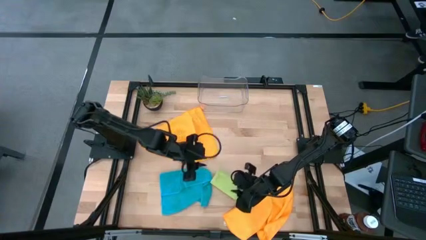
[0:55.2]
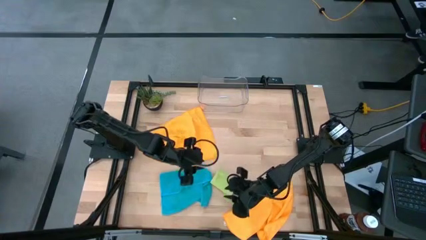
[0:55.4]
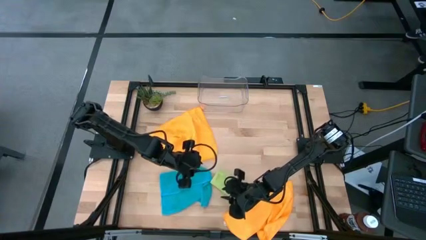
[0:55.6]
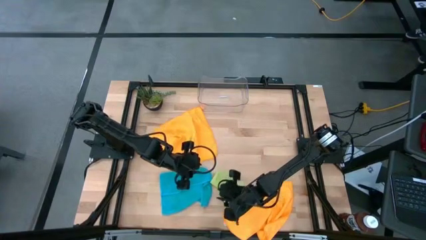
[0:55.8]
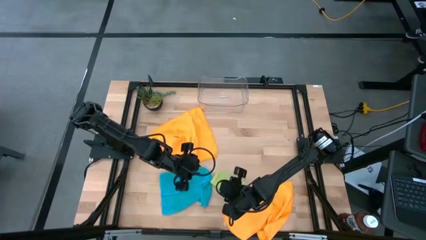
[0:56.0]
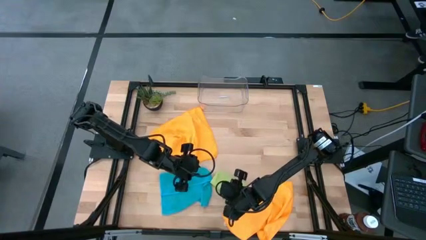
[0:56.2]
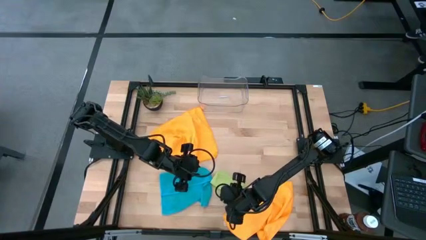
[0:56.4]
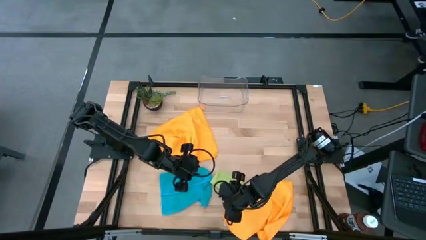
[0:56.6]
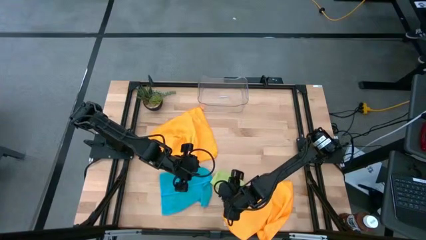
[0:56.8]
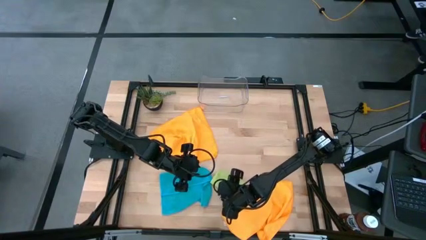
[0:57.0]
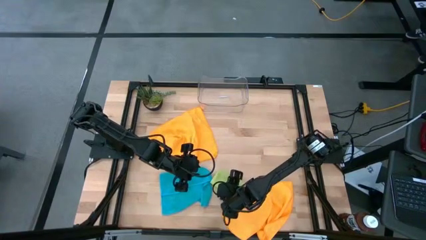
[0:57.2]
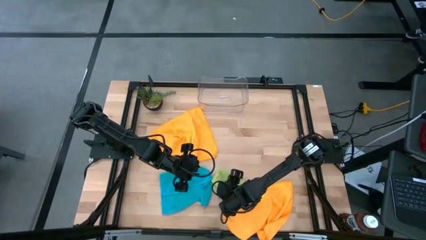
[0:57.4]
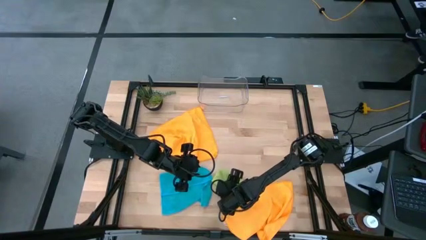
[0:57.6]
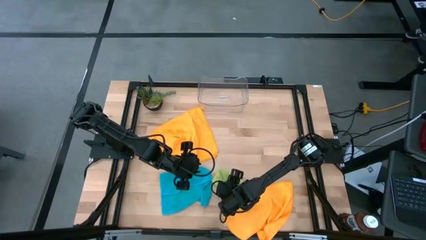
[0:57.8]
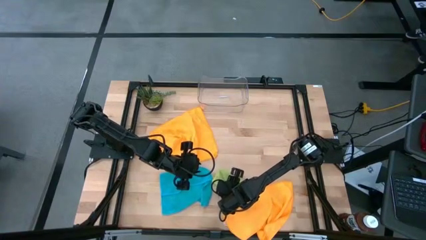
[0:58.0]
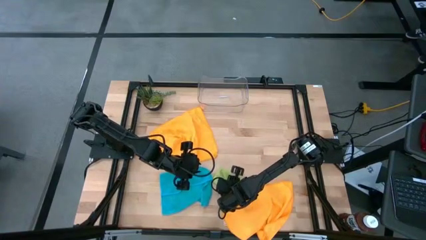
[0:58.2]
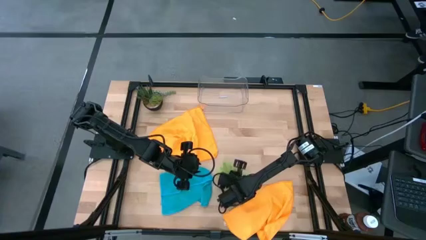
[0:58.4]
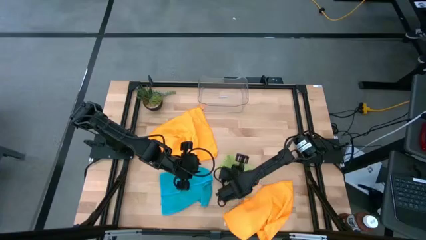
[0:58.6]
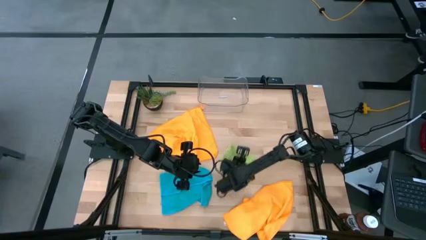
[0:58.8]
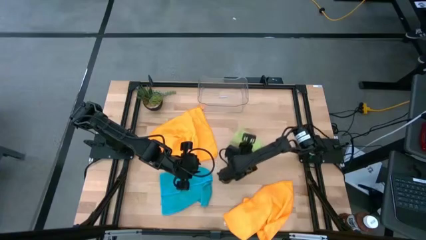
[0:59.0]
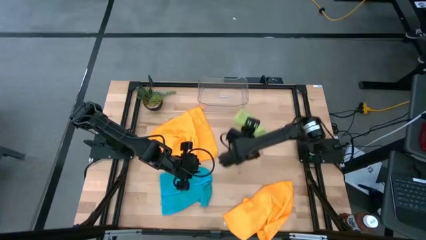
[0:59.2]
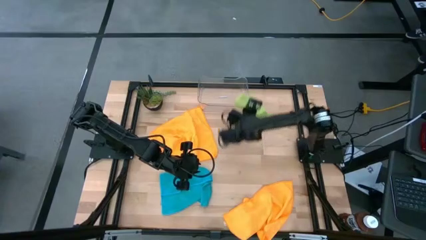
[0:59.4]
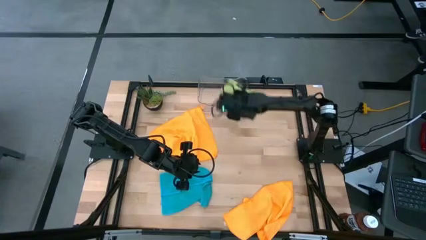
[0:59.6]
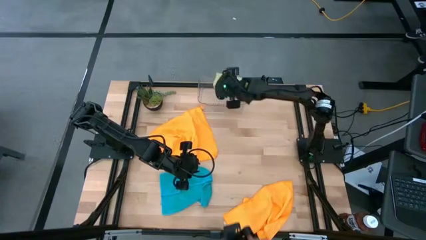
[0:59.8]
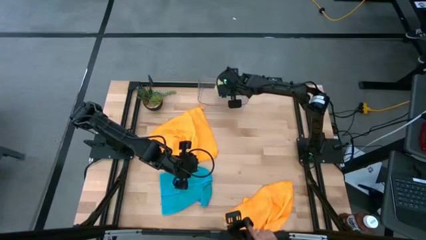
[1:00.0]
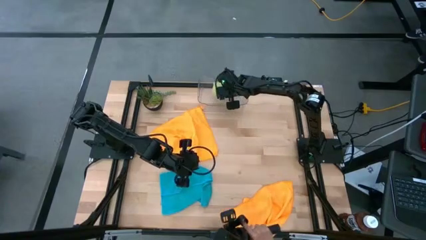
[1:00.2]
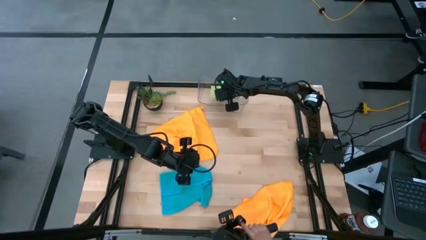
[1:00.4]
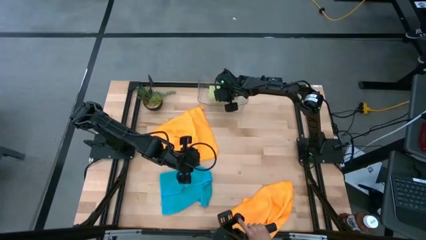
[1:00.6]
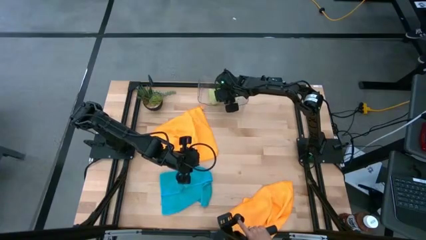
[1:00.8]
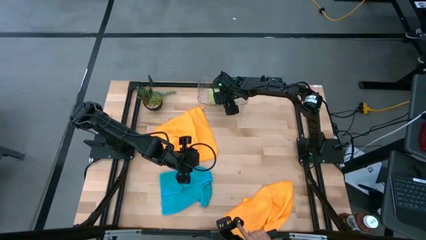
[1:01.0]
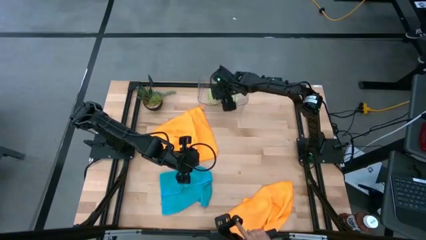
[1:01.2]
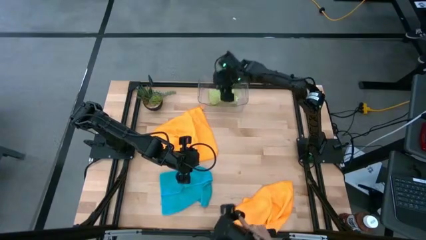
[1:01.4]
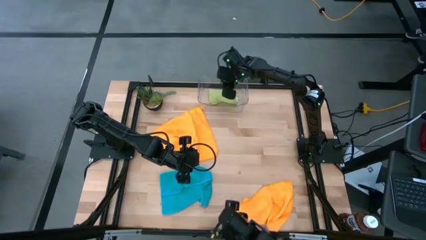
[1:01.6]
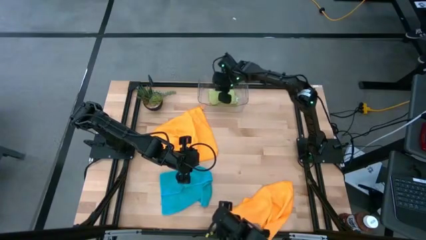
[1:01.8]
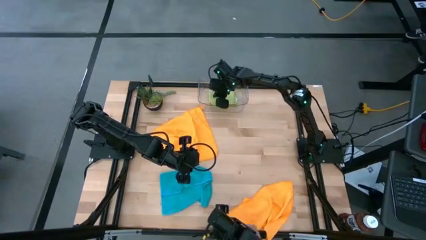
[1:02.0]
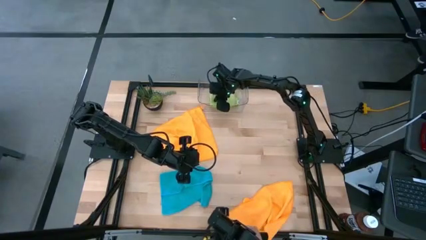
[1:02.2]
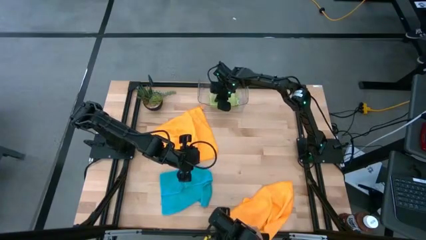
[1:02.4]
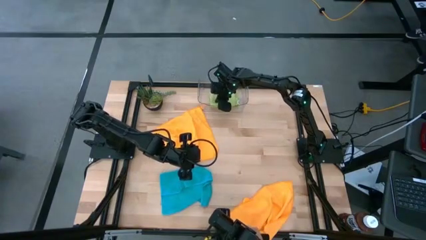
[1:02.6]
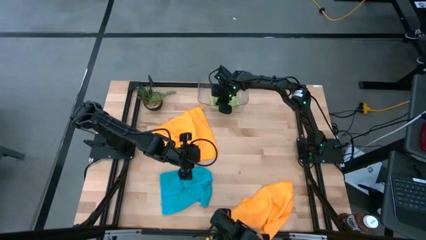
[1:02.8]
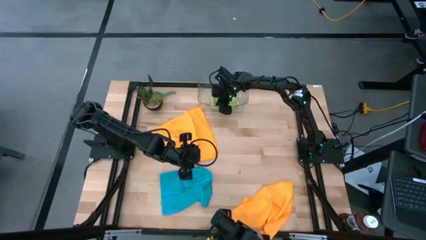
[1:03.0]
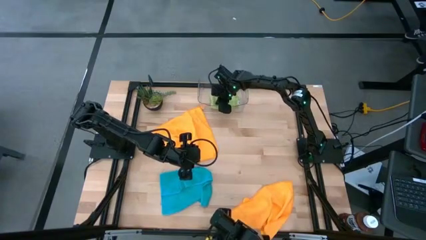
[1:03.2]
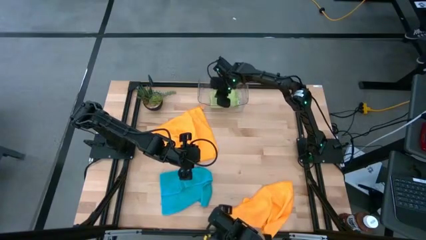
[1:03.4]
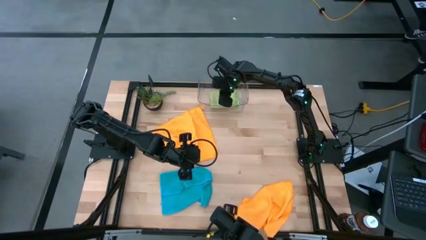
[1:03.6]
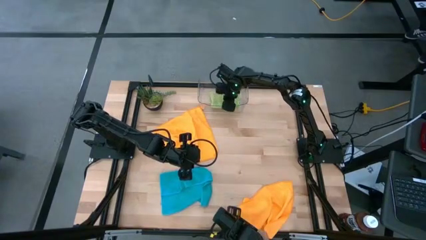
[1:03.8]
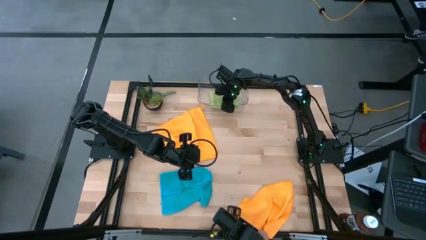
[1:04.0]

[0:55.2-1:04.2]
Task: Fold microfiber towels
Put the green microfiber cloth into the transparent bin

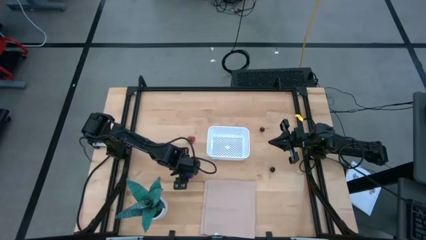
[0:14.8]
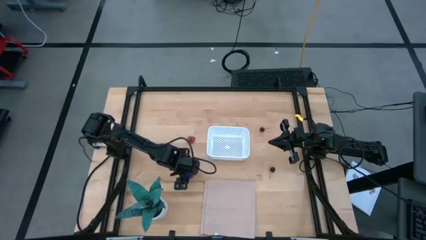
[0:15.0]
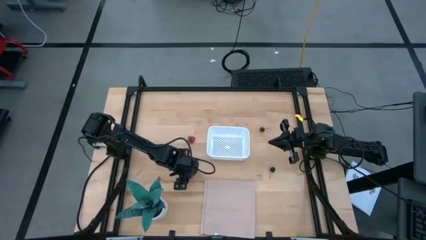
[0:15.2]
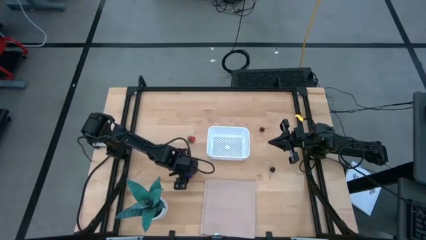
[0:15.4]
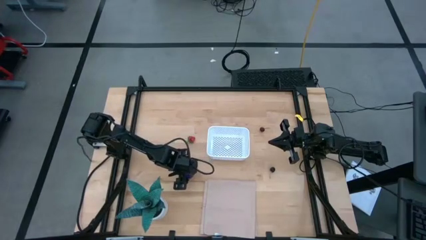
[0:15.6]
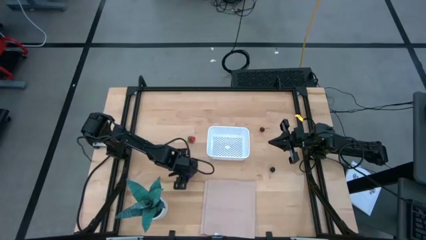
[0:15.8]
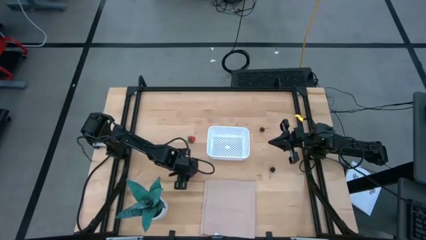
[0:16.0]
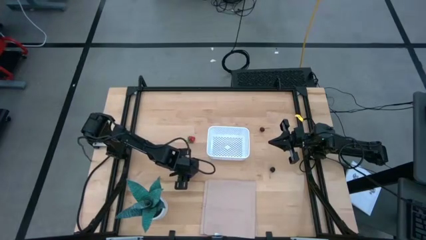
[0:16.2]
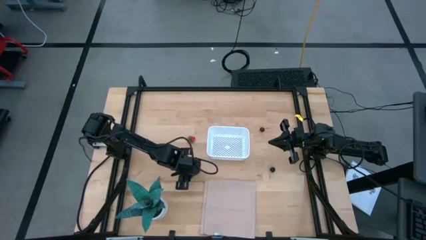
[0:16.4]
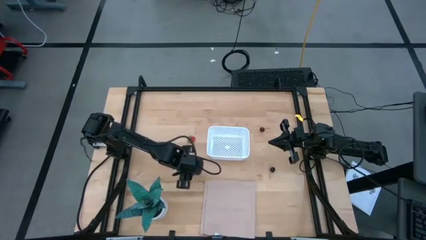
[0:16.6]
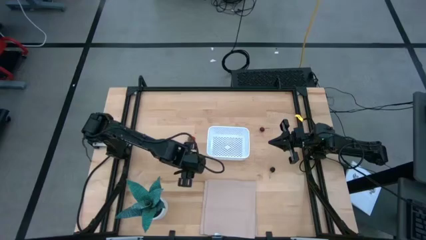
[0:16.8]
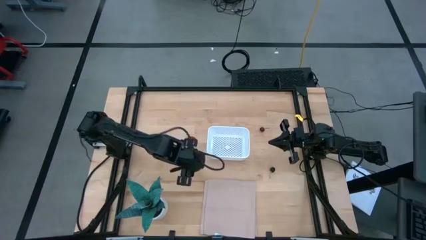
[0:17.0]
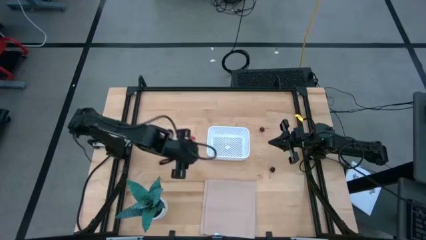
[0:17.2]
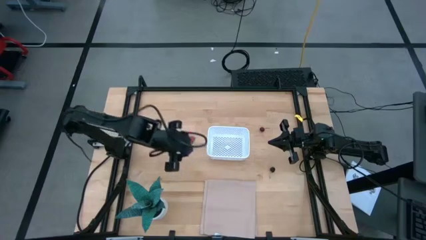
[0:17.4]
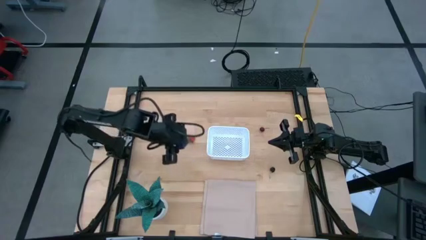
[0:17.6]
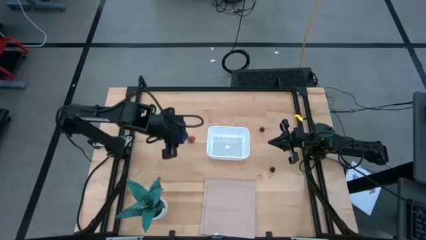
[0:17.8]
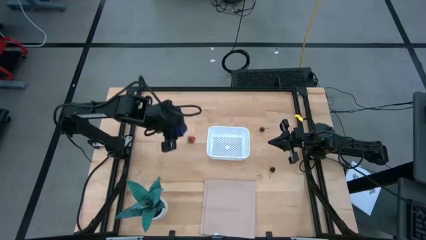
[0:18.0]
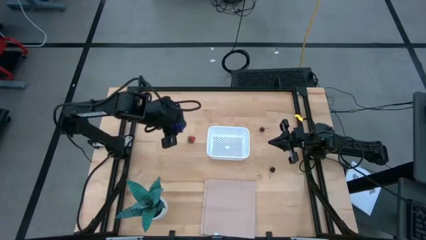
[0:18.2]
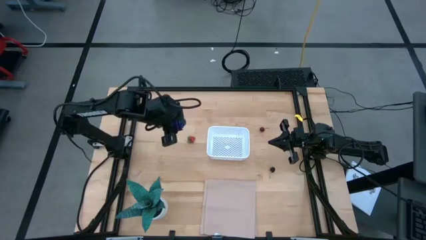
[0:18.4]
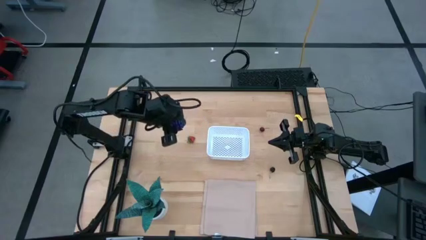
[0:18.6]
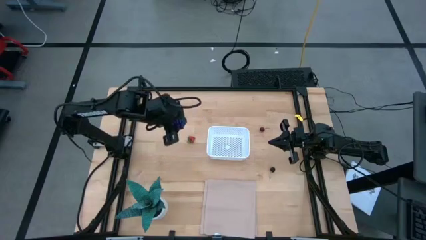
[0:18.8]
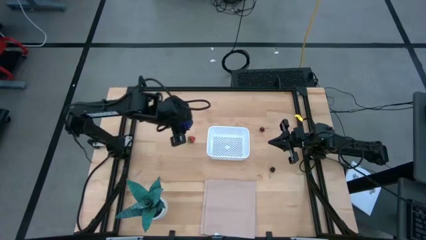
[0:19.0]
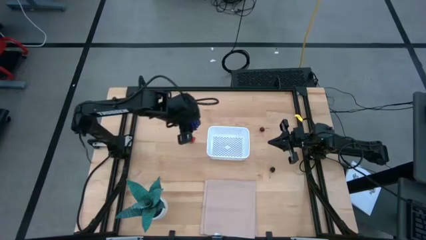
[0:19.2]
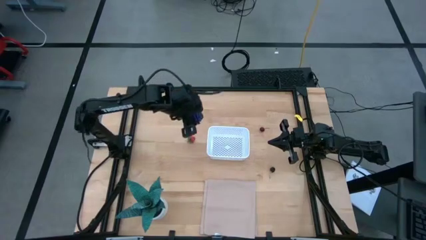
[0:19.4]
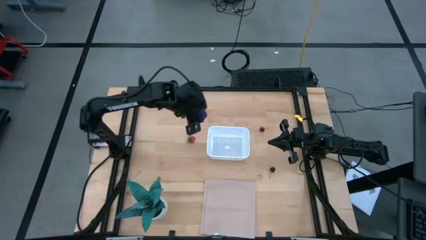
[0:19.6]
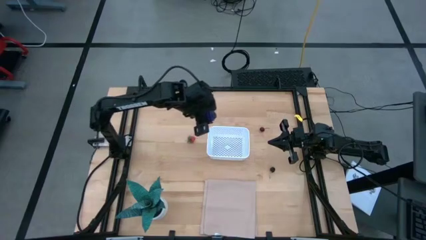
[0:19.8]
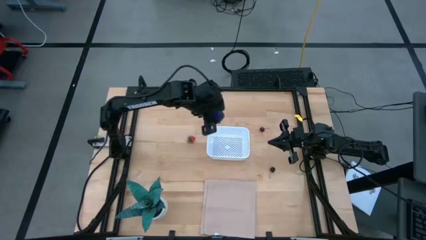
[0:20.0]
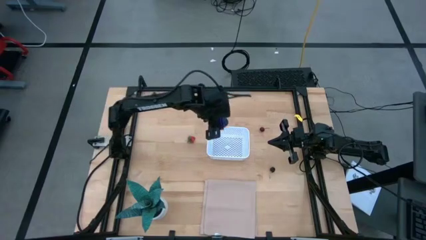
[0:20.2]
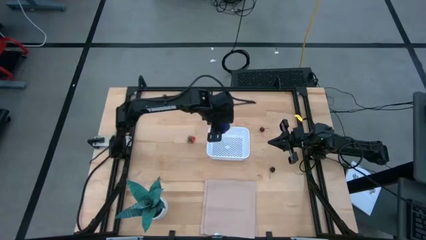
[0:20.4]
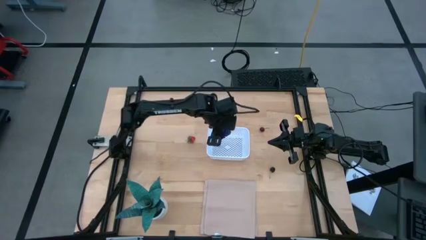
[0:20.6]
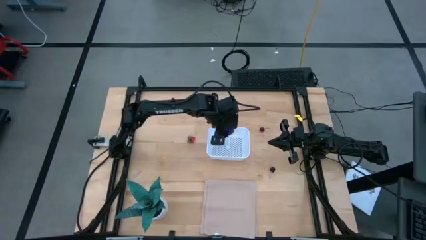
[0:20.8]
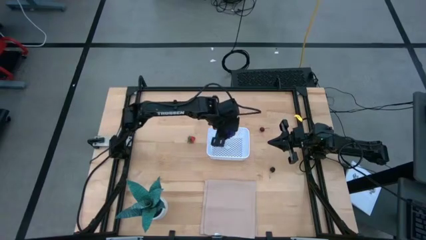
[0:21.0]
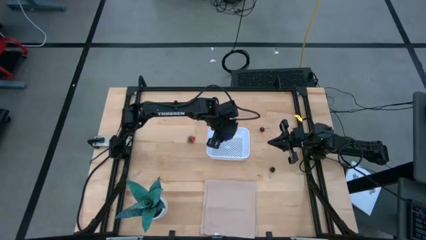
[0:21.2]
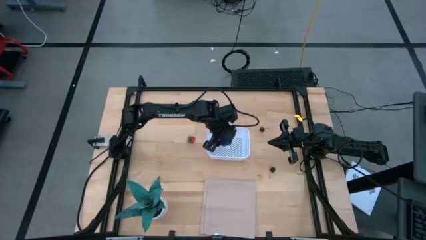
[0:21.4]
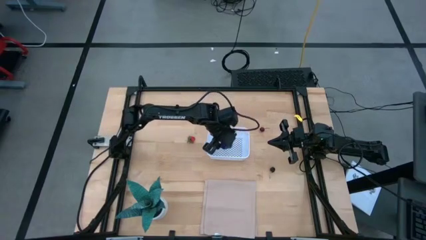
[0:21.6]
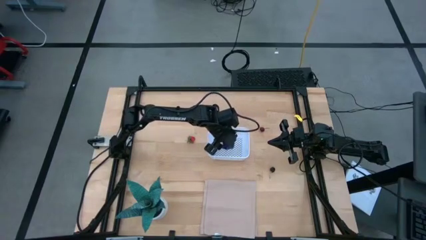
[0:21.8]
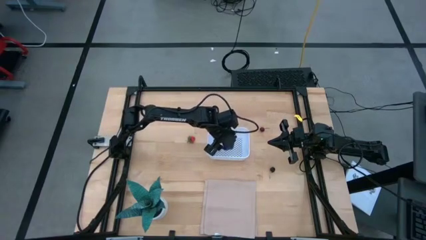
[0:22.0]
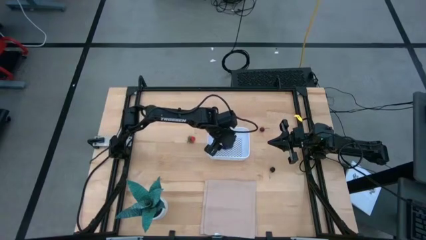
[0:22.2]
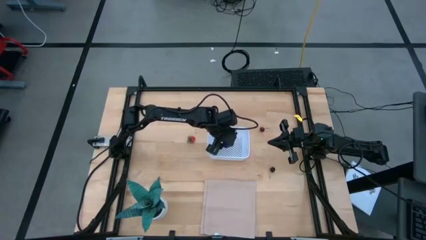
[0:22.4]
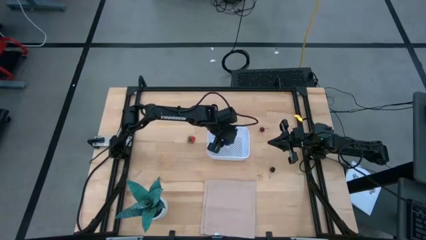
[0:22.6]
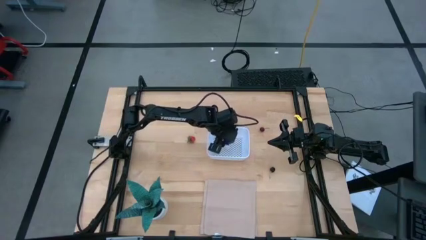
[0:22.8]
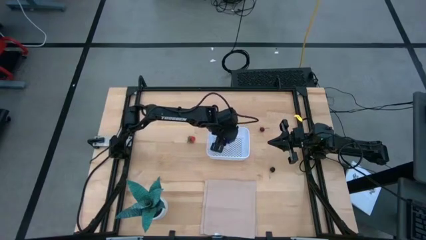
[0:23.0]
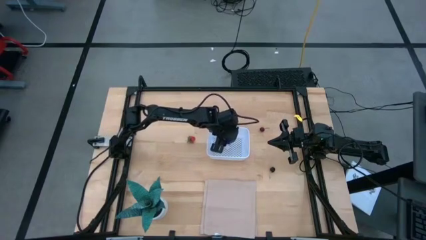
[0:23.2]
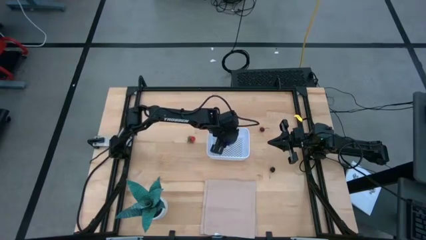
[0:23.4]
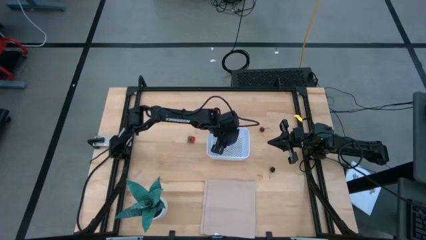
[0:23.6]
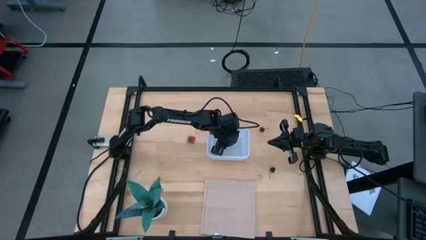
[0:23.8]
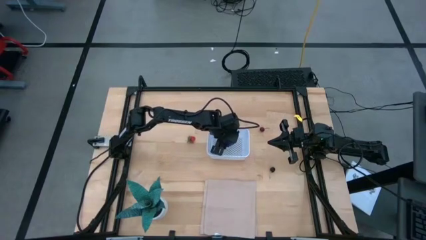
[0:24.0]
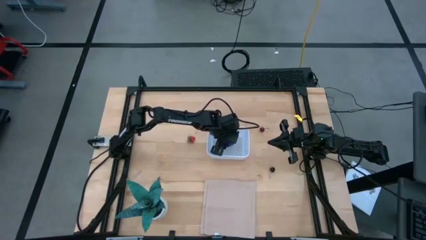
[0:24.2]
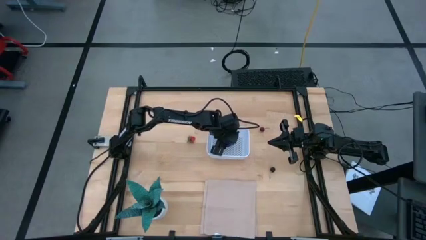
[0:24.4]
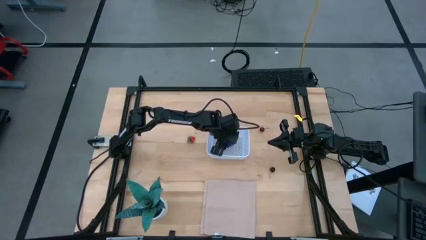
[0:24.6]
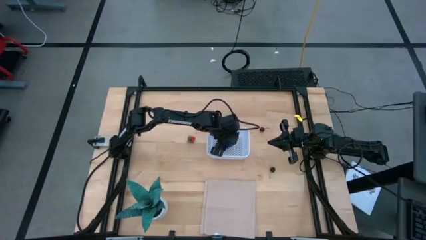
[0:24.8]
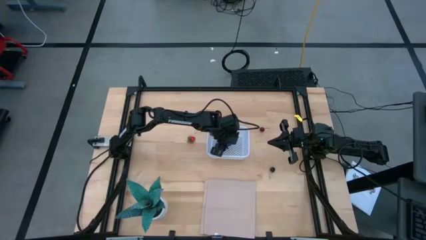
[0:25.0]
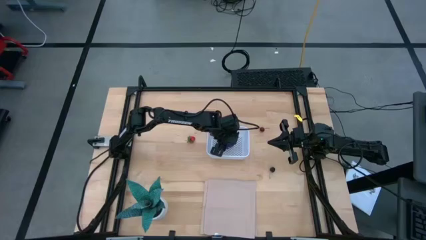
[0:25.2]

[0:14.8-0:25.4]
Task: Pick and placing Produce into tupperware
Put the grapes into the white bin
